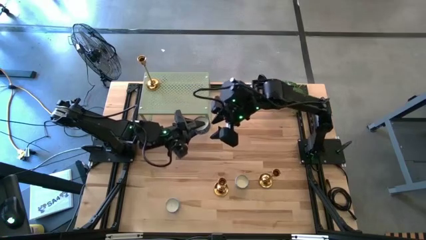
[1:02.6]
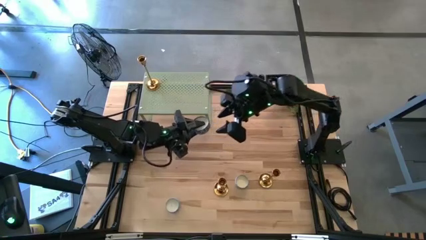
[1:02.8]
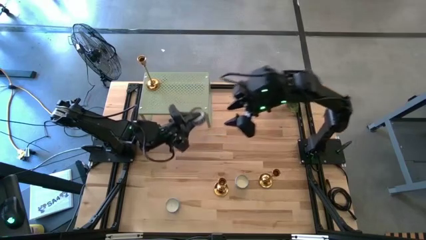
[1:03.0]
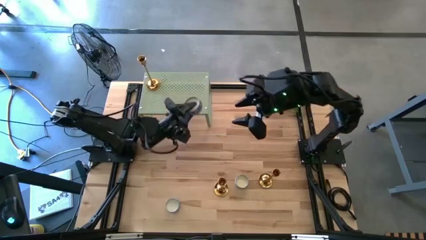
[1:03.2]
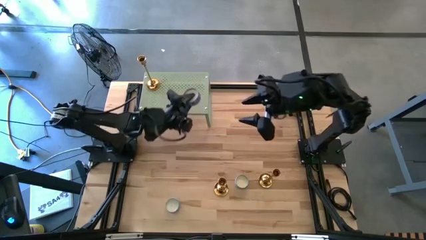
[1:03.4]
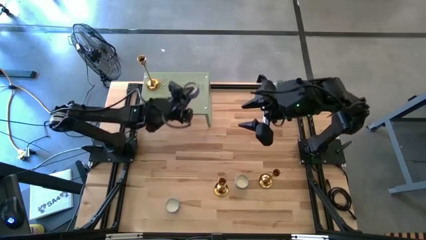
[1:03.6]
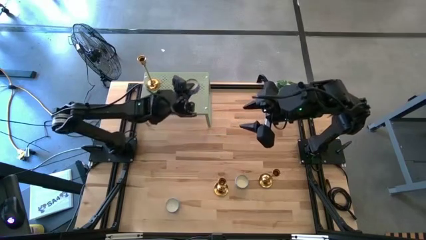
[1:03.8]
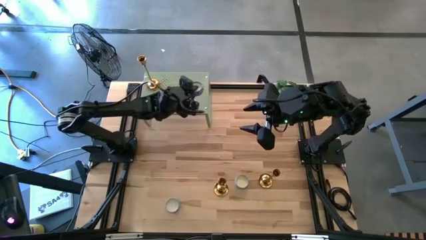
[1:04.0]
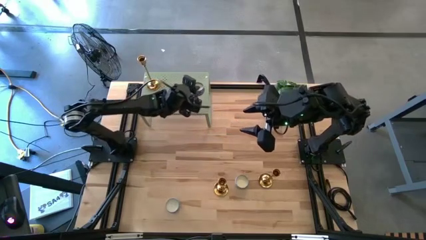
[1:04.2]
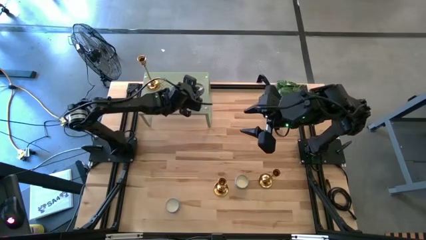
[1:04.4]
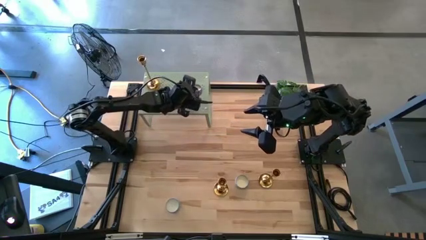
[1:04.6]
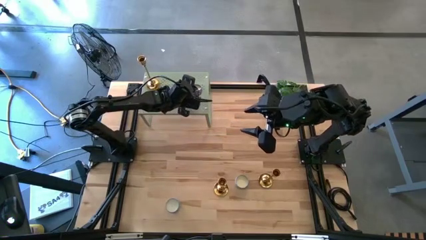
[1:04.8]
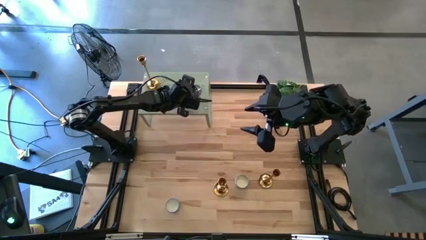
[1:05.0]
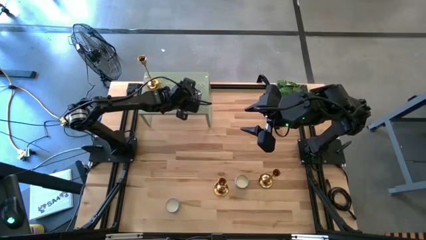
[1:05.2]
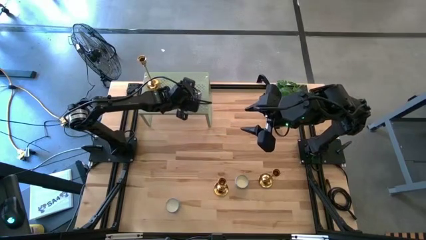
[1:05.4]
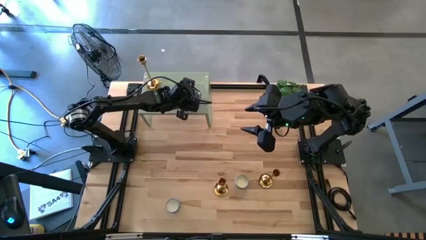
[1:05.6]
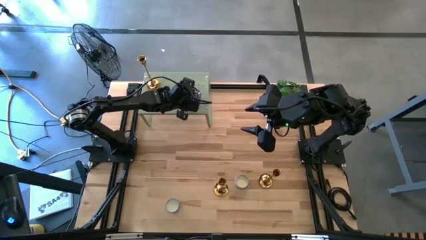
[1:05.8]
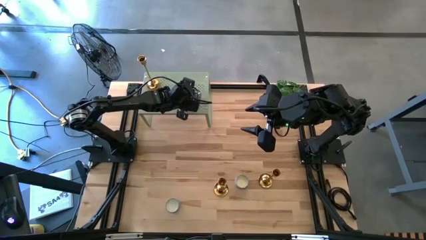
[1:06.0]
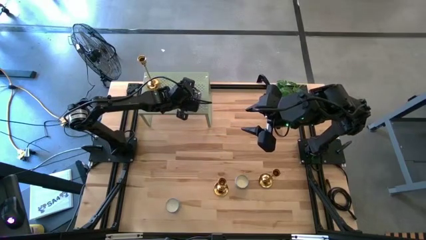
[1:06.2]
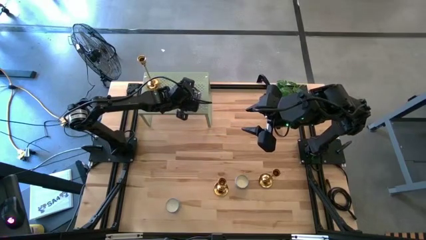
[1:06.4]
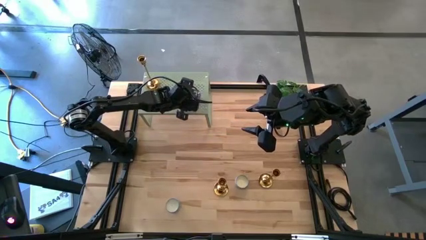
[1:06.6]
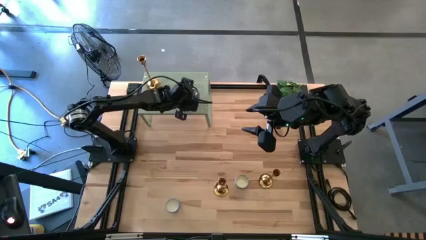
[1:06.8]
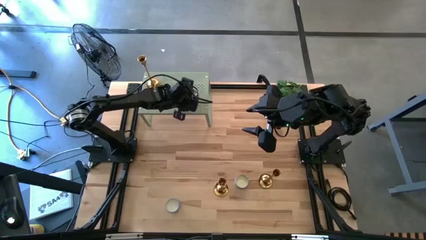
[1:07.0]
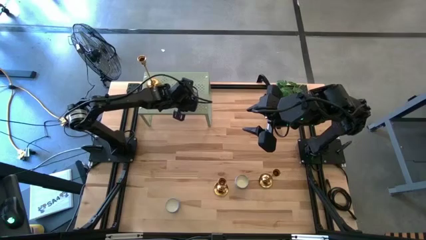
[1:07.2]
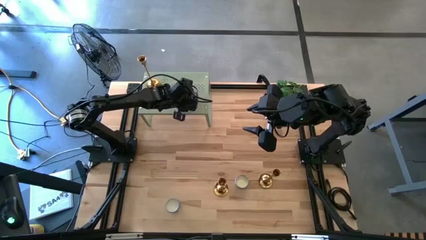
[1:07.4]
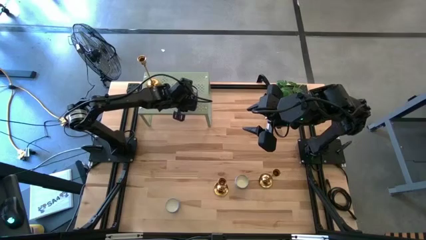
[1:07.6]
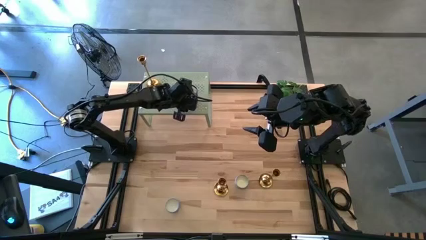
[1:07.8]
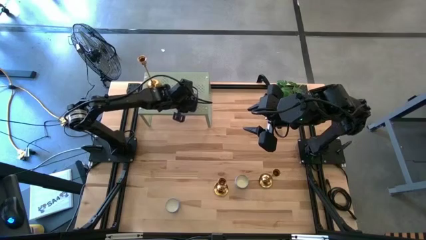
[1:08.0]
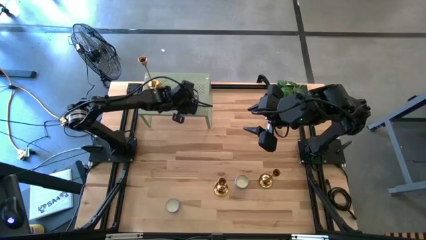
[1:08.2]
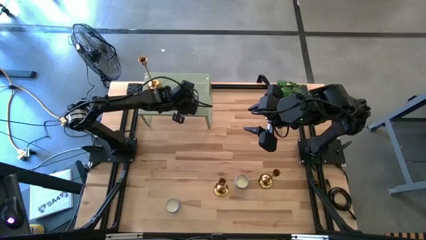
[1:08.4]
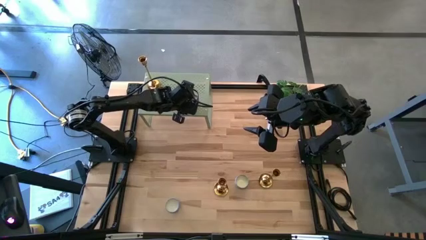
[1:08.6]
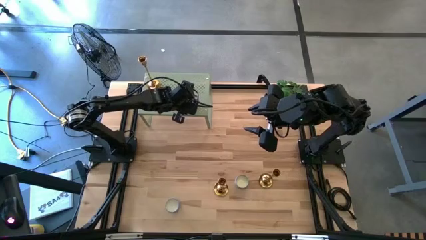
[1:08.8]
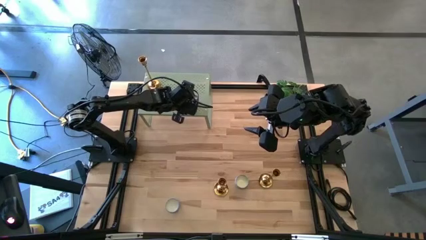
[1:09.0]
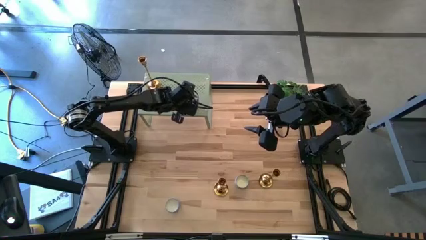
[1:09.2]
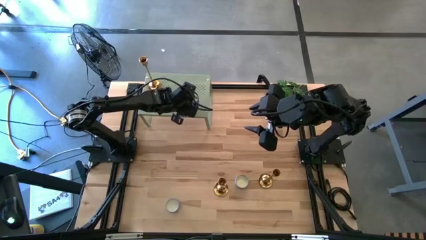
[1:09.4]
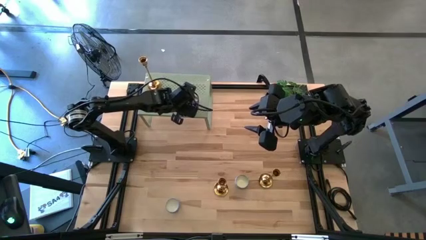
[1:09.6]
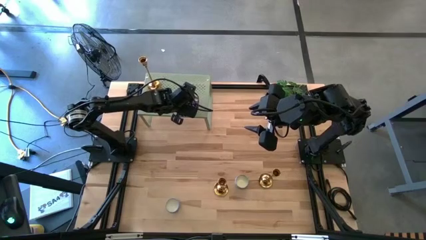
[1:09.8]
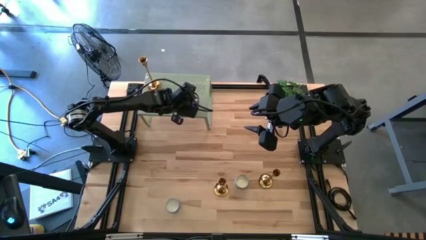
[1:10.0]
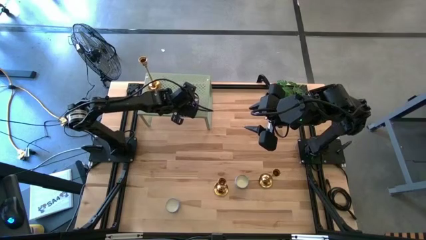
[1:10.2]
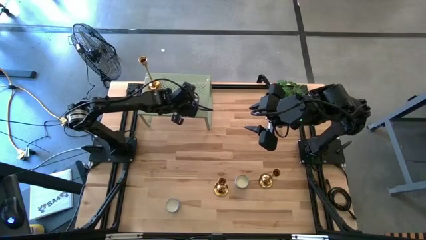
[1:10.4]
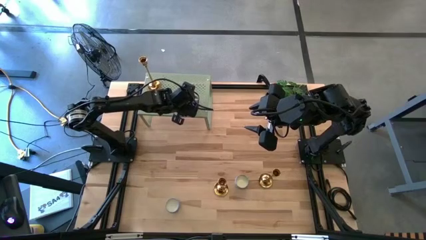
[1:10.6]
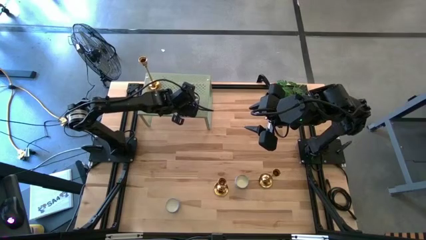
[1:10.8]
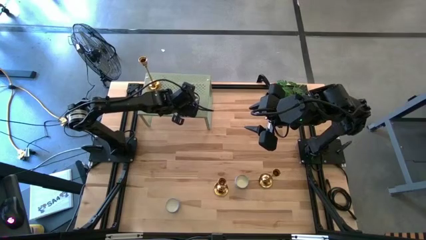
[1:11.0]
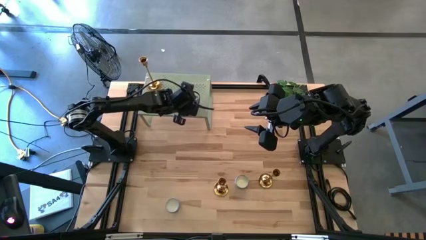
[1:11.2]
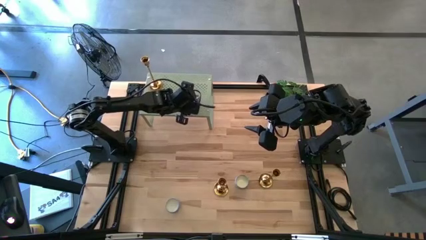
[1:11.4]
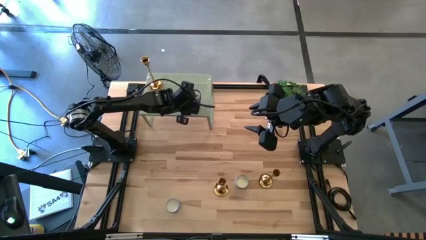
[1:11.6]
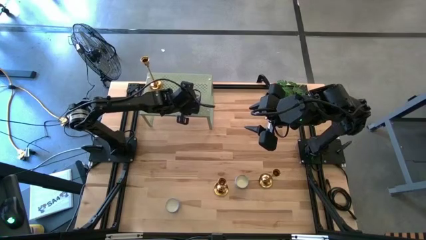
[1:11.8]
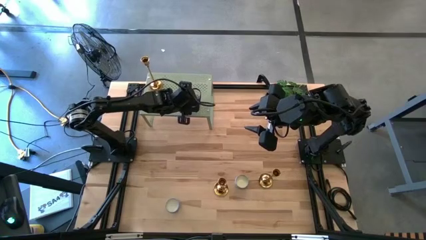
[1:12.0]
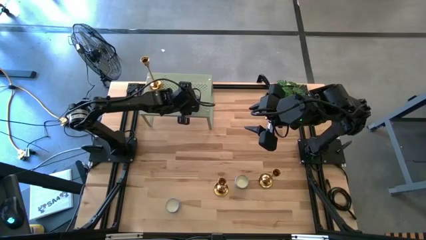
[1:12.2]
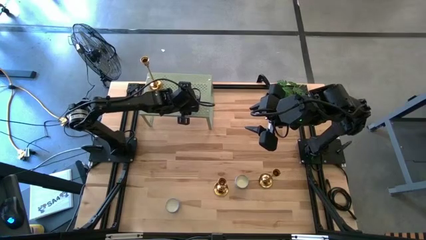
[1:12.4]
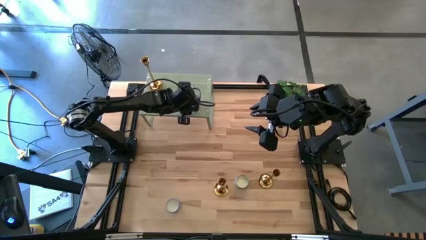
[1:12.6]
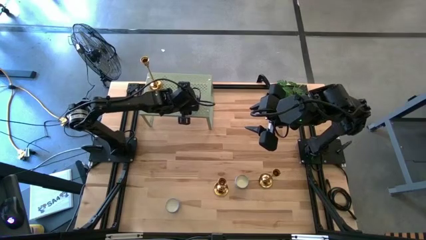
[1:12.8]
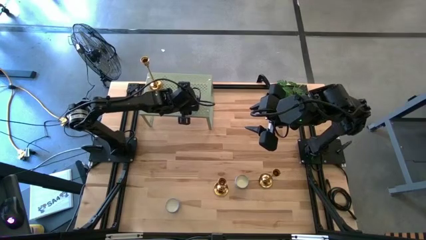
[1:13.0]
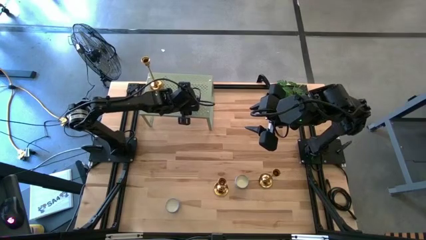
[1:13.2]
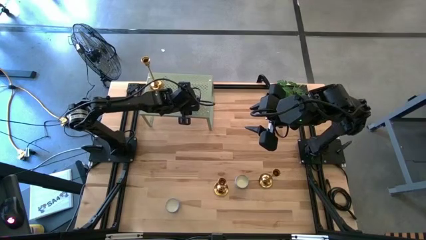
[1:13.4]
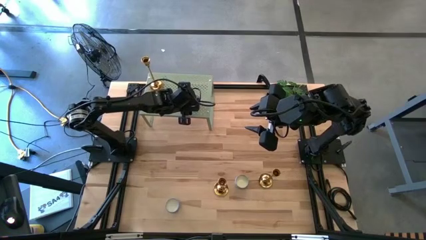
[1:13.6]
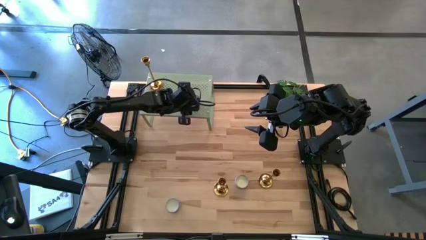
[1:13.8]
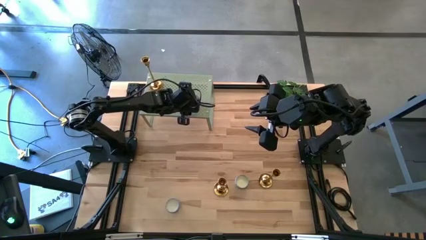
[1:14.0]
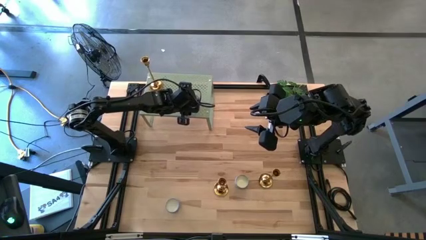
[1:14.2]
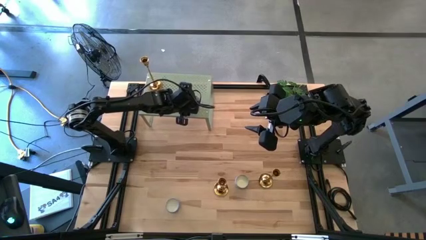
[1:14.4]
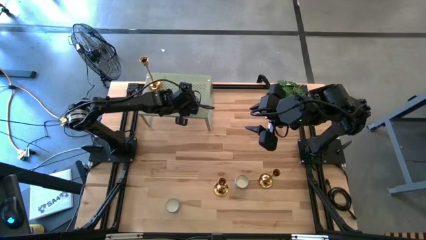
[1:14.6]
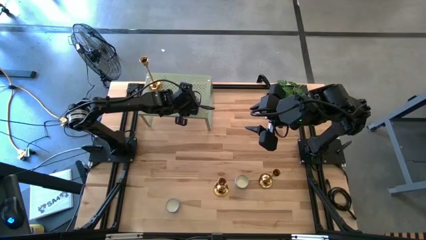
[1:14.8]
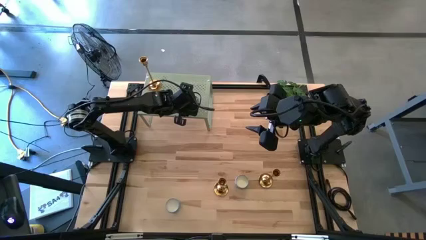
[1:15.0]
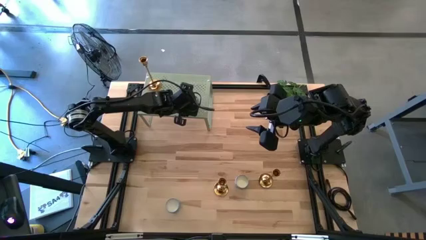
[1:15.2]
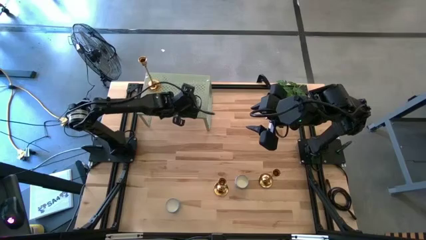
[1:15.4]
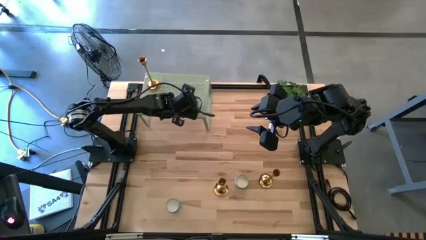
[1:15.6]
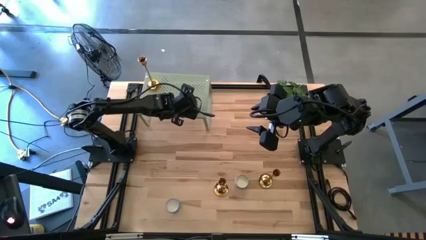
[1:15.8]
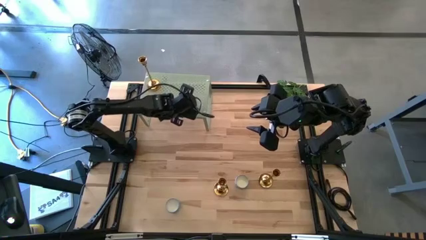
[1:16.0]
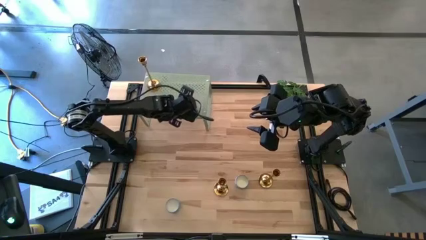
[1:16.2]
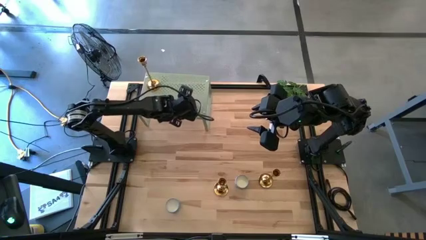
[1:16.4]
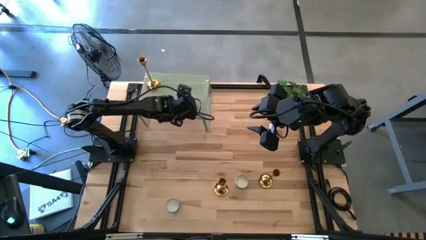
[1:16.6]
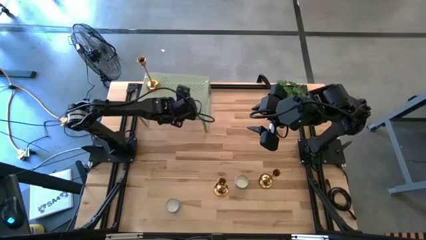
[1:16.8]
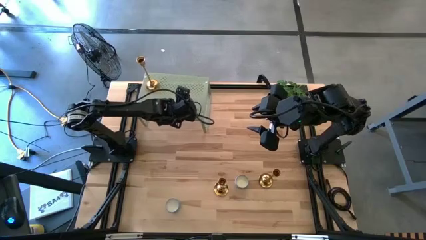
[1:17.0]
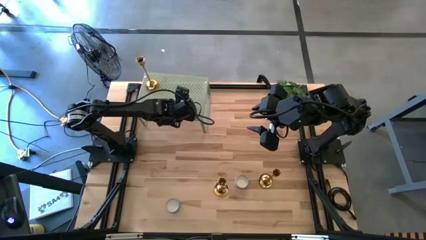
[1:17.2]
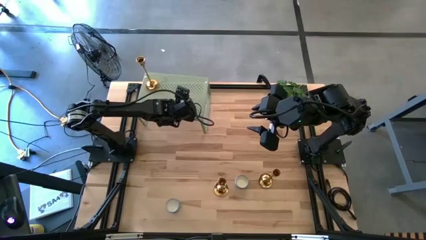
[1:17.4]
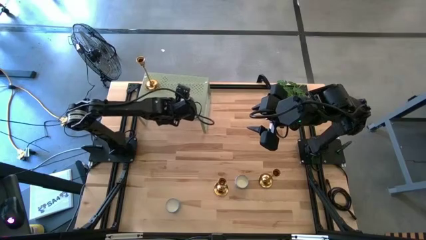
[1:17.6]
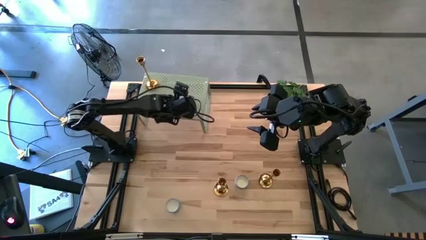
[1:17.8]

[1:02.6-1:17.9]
Task: Pick & Place candle stick holders
Put the top right blue patterned round candle on the shelf
